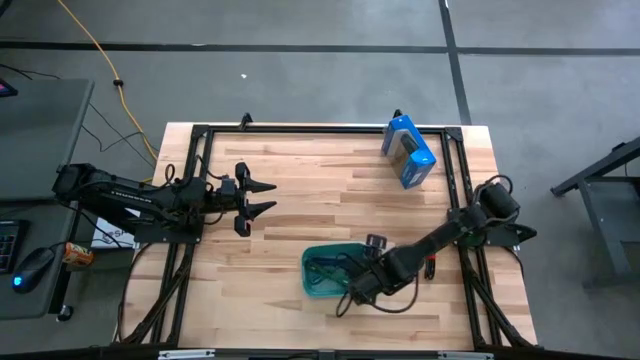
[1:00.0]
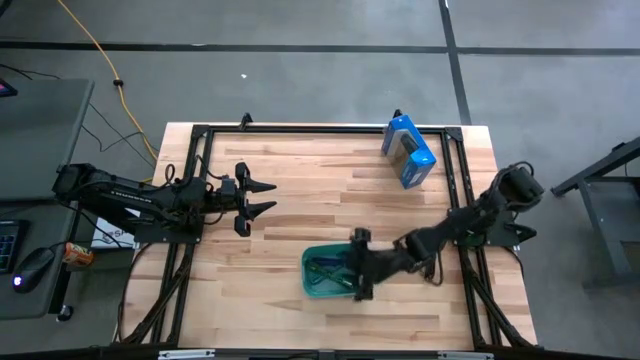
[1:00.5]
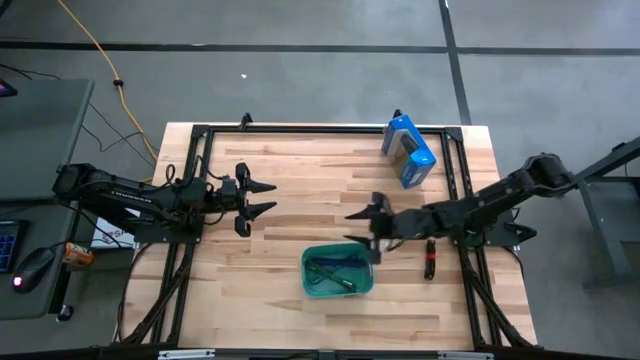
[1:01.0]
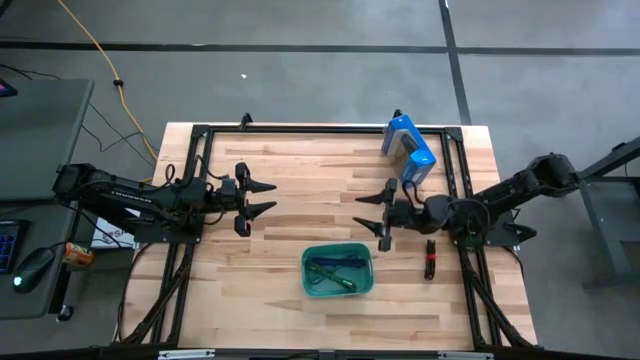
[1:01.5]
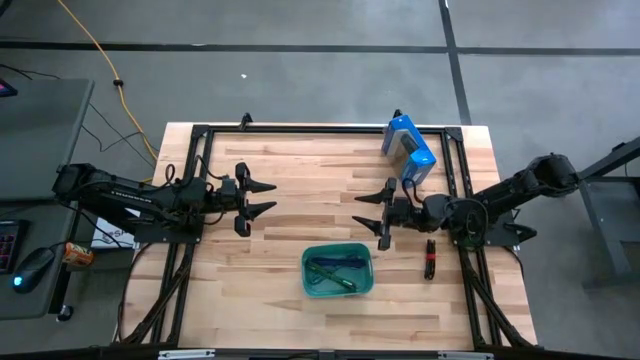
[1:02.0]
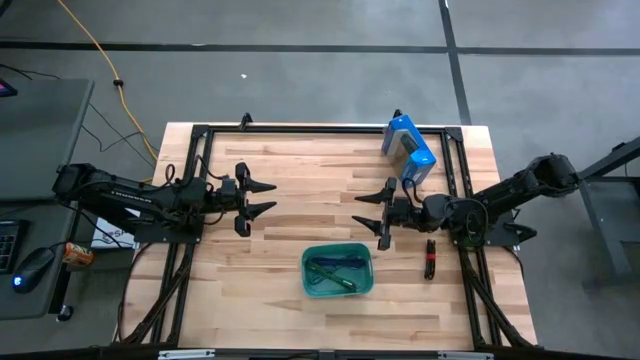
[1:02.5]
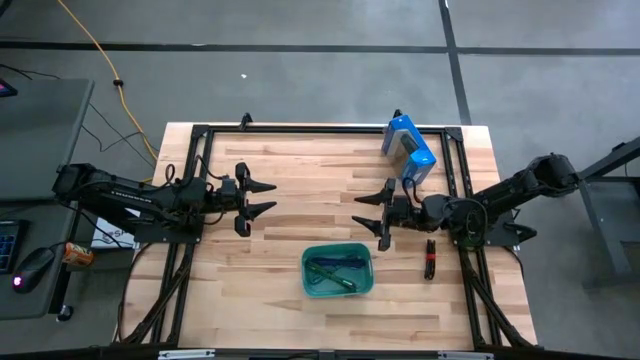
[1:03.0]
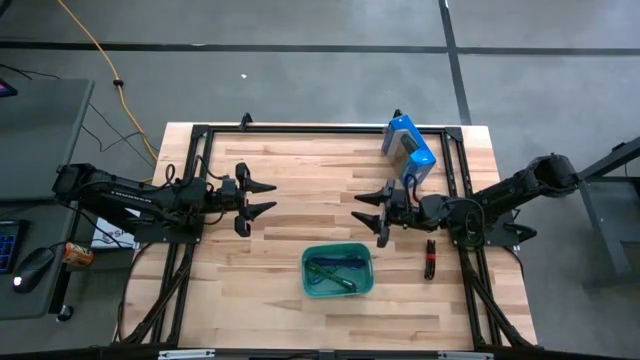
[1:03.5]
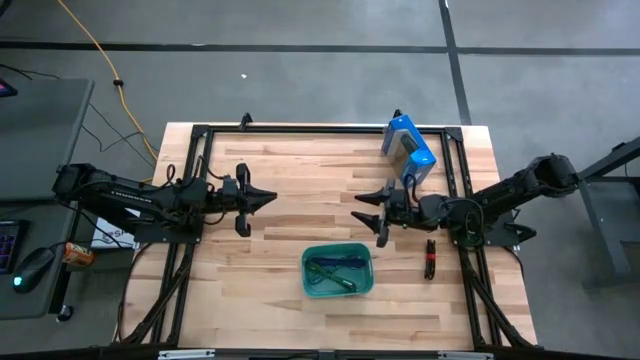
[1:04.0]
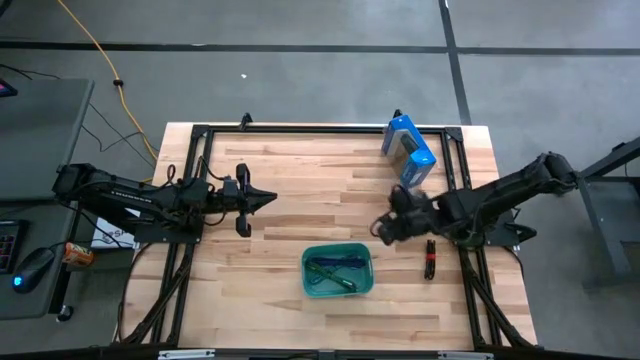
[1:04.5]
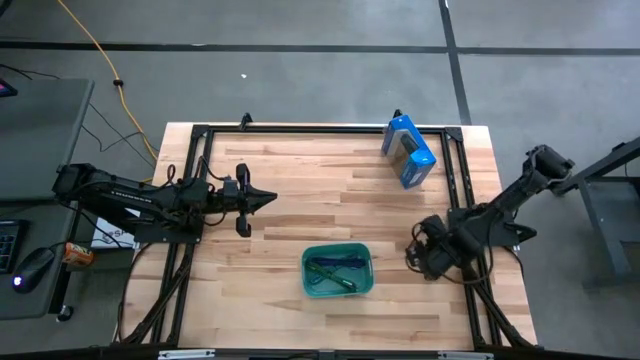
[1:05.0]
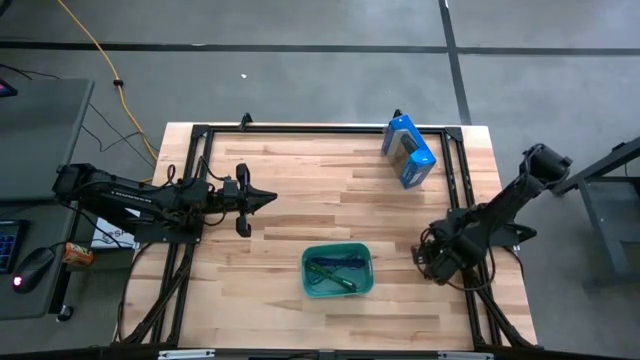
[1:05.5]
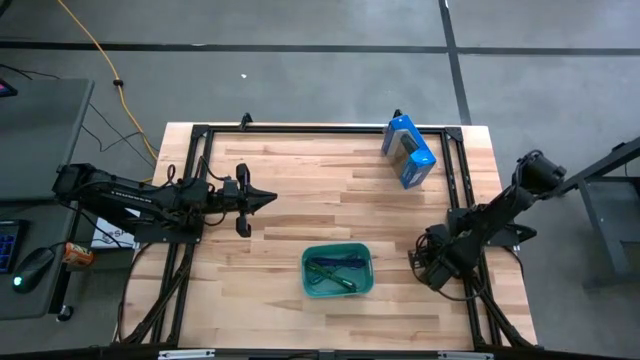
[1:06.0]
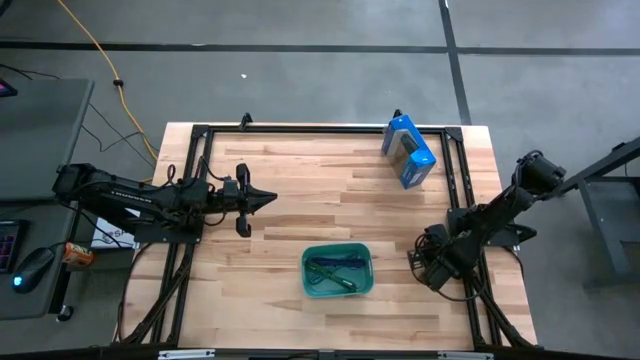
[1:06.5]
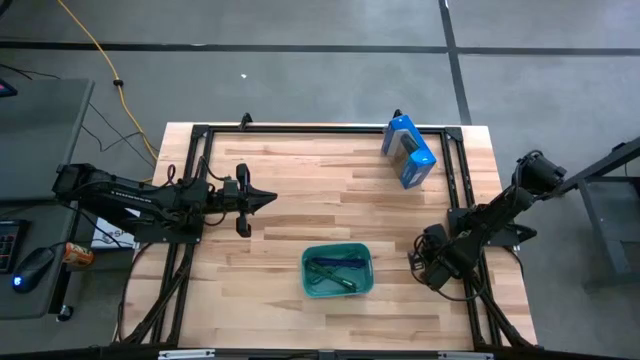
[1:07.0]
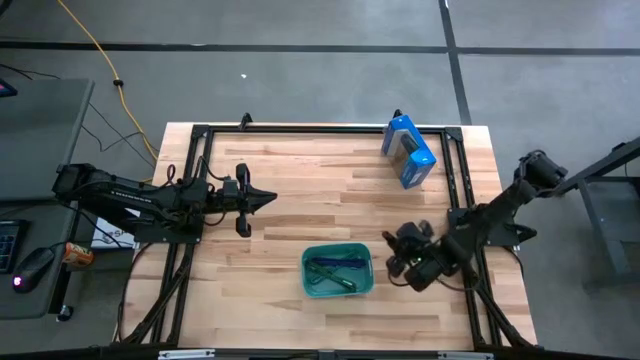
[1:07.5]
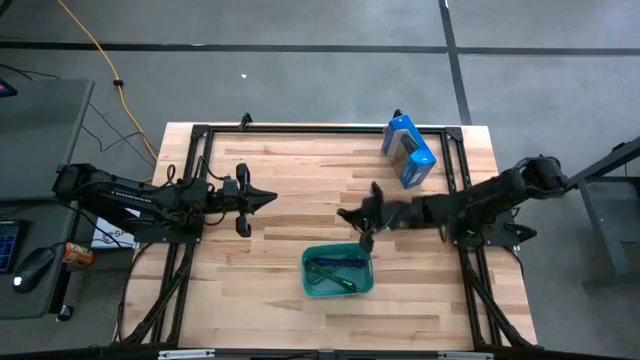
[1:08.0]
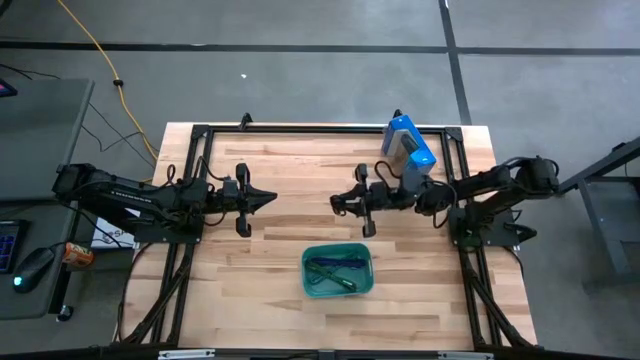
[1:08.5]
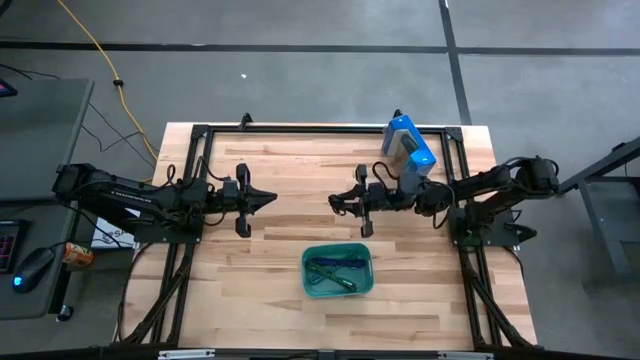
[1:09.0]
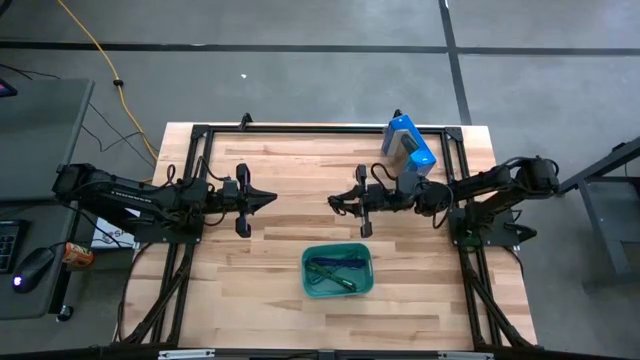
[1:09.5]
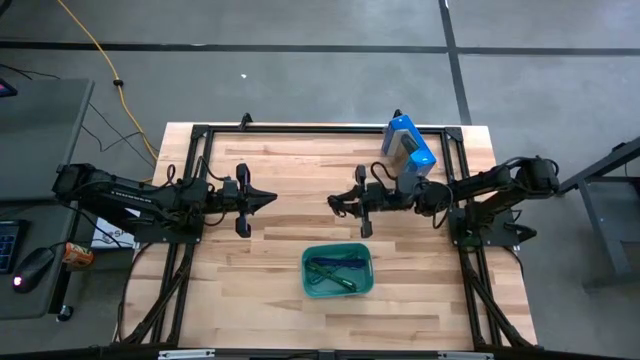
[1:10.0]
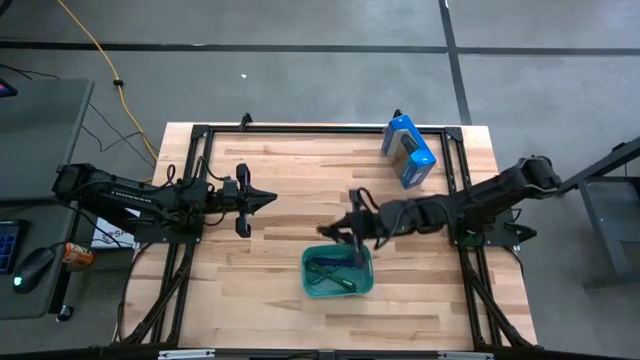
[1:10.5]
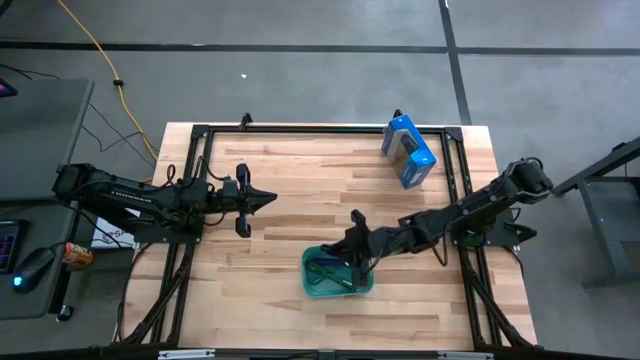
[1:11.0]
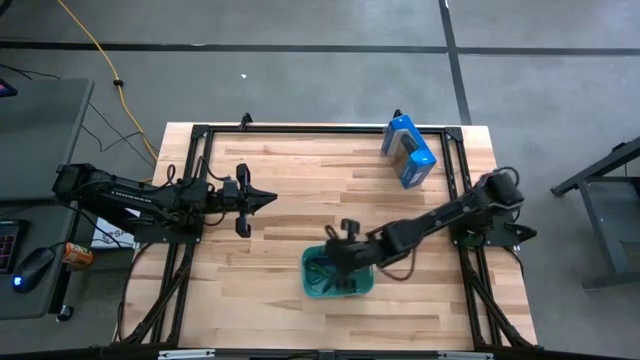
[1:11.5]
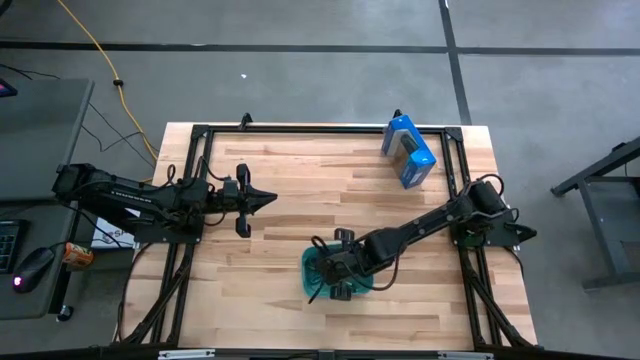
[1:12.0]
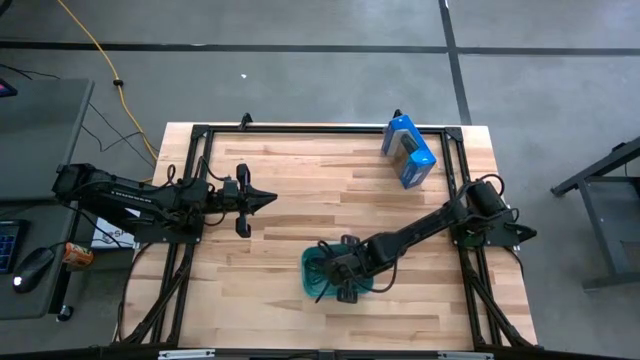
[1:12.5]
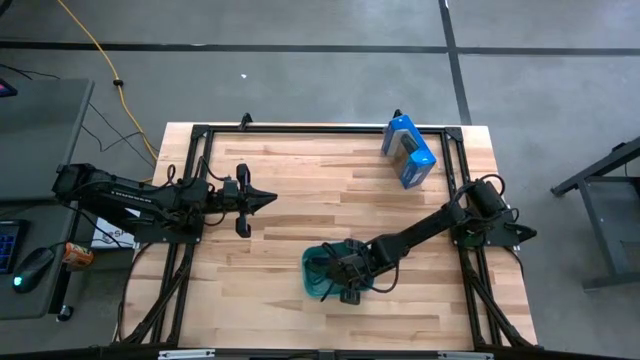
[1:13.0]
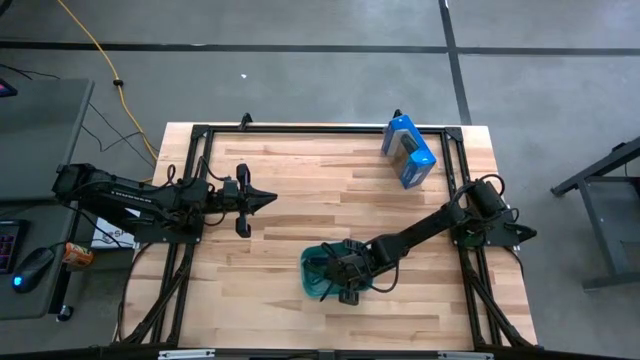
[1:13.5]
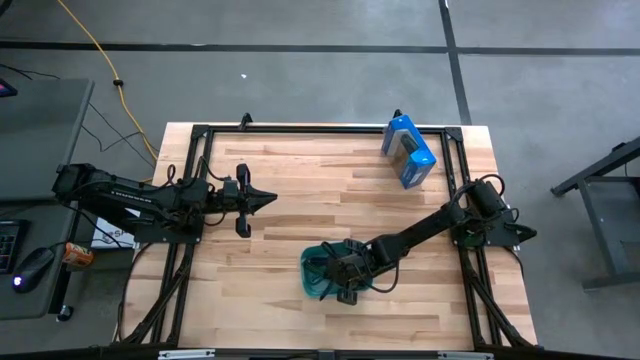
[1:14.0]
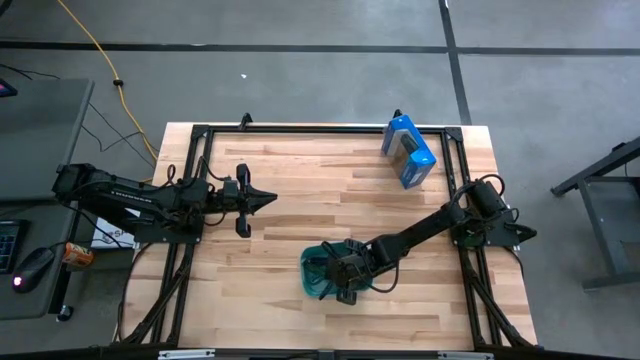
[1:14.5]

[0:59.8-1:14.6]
Task: Pick and place USB-C Cables
Put the black charger cable into the green bin

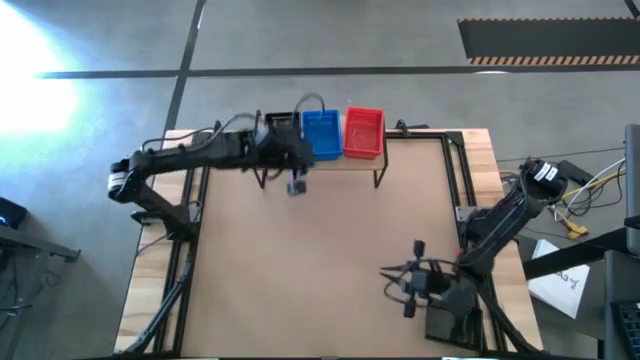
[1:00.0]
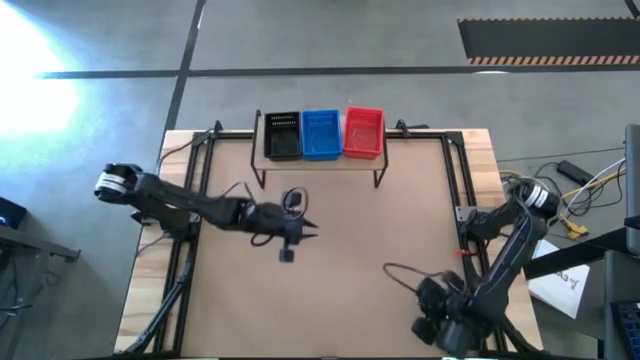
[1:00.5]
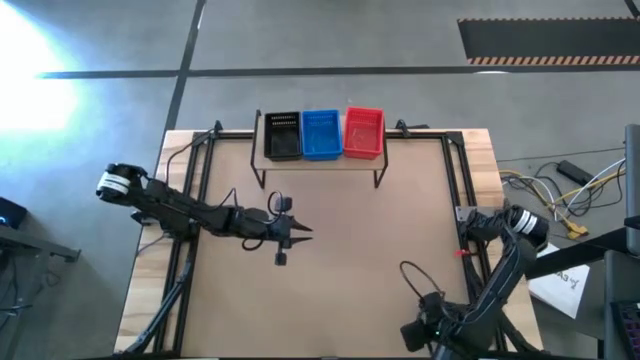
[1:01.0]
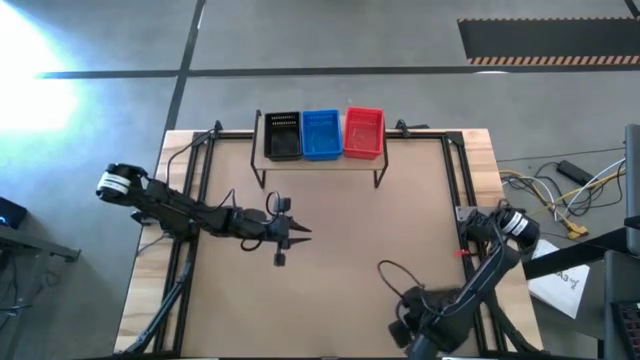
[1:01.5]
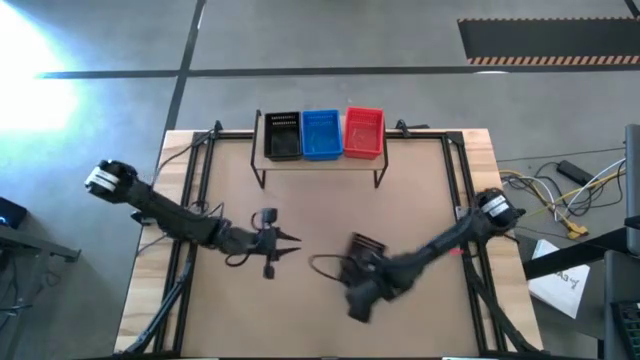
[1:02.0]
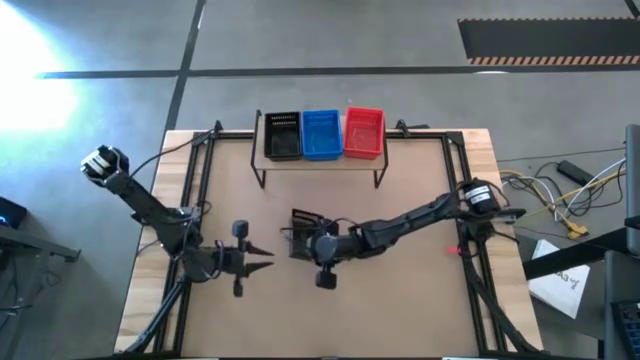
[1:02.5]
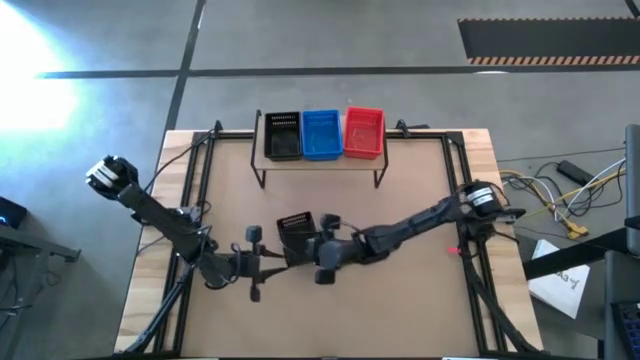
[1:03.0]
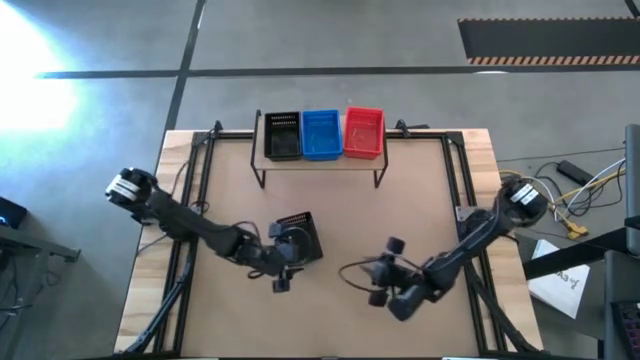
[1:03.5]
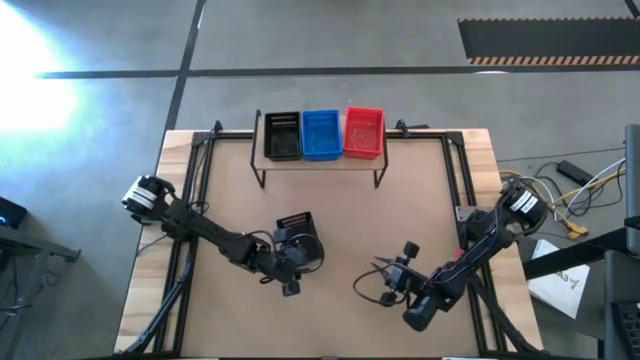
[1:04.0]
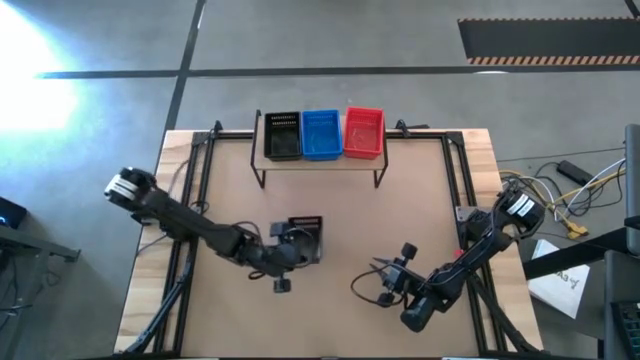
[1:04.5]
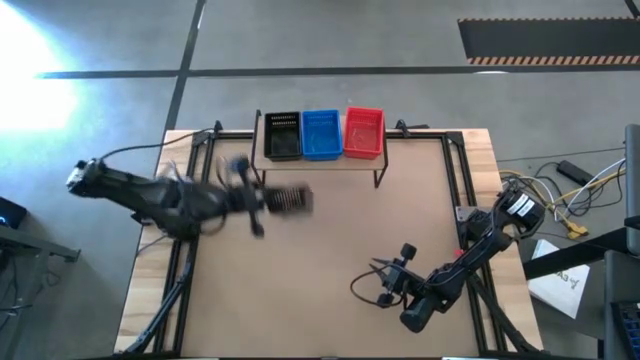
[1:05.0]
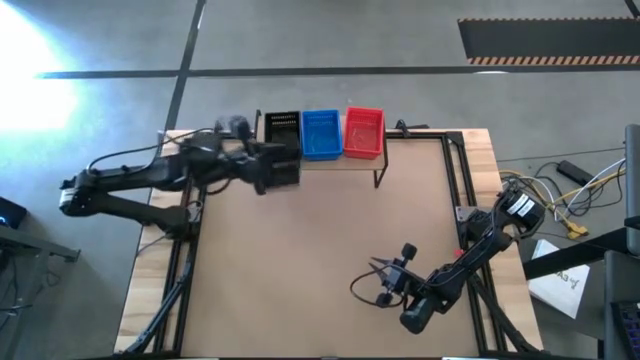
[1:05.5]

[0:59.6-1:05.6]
Task: Stack baskets on shelf by color
Stack the black bin on the black bins on the shelf
